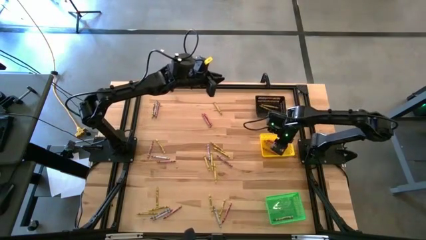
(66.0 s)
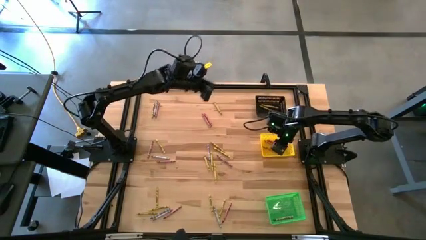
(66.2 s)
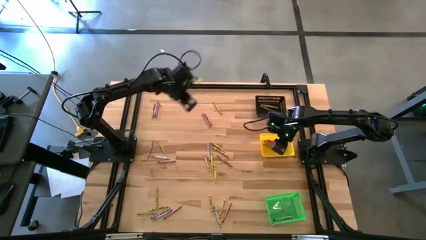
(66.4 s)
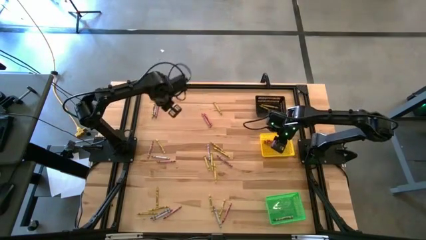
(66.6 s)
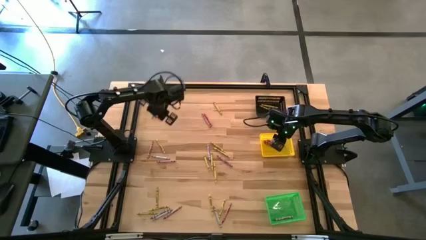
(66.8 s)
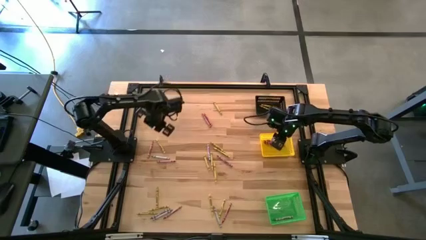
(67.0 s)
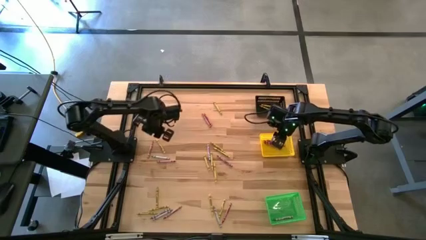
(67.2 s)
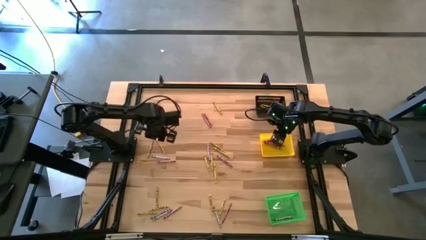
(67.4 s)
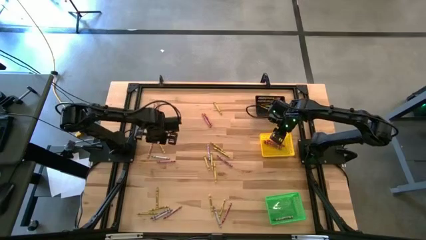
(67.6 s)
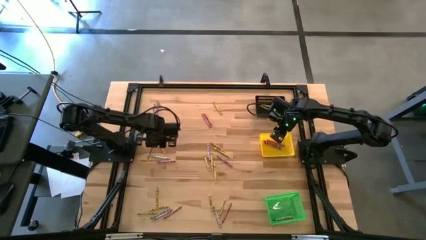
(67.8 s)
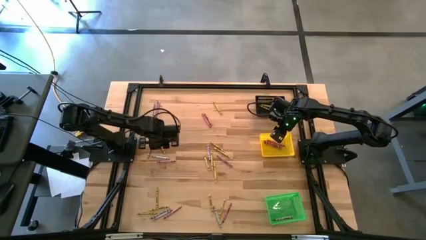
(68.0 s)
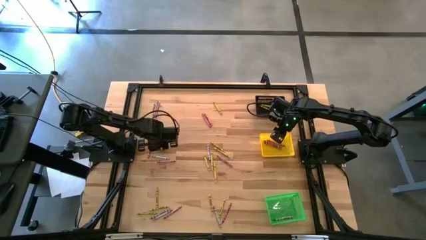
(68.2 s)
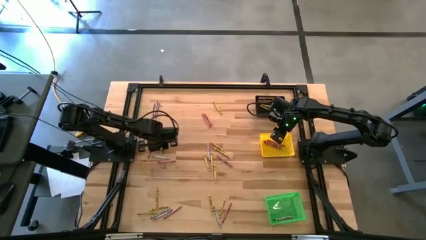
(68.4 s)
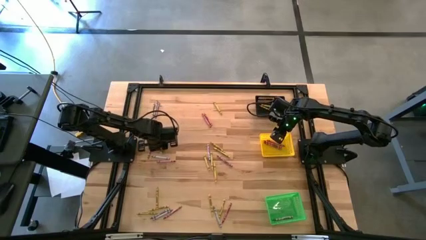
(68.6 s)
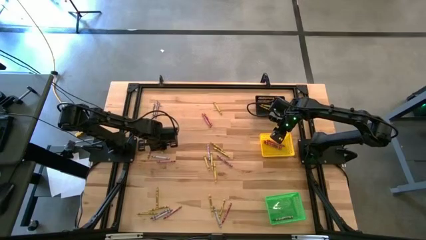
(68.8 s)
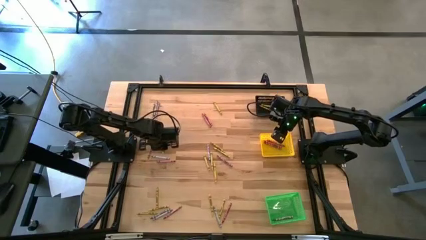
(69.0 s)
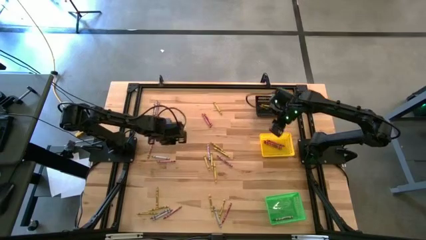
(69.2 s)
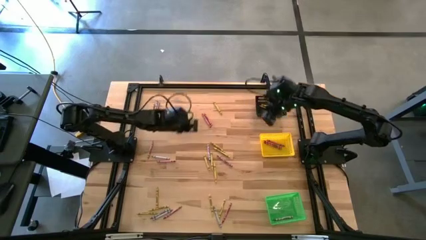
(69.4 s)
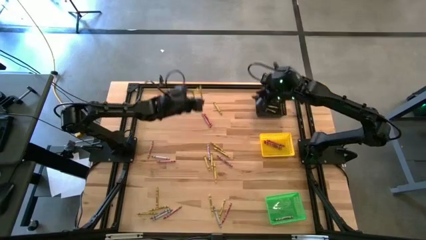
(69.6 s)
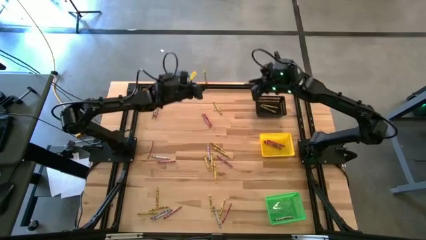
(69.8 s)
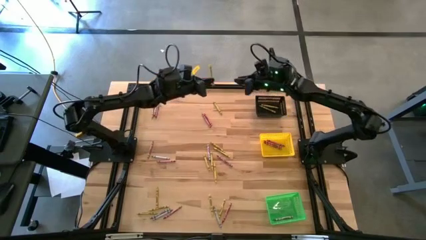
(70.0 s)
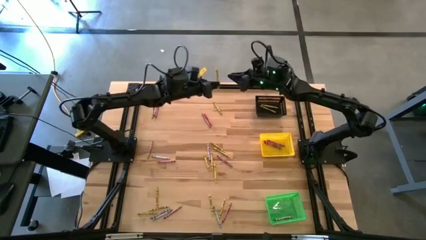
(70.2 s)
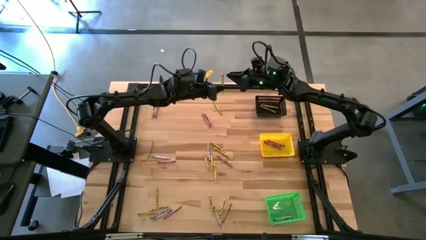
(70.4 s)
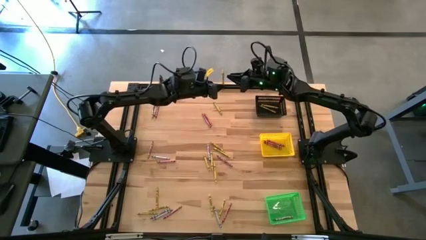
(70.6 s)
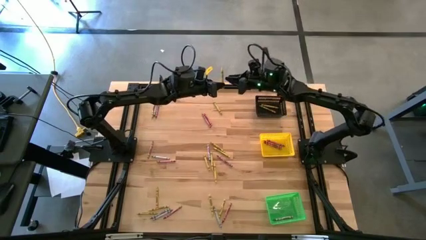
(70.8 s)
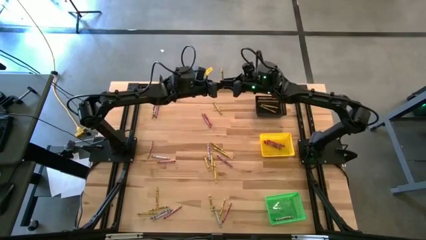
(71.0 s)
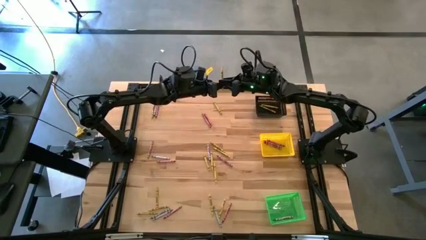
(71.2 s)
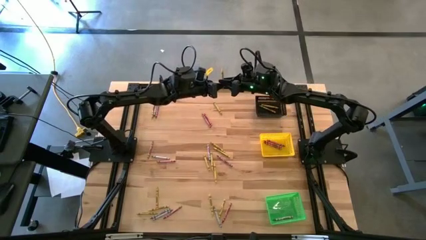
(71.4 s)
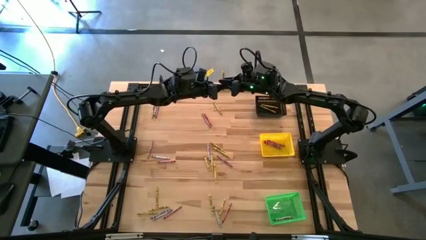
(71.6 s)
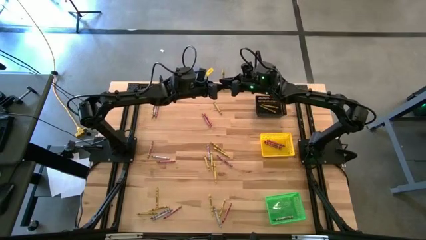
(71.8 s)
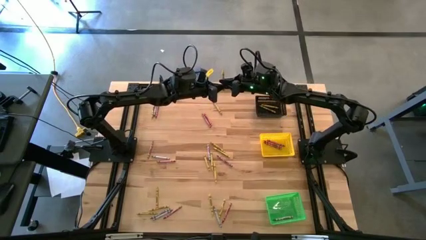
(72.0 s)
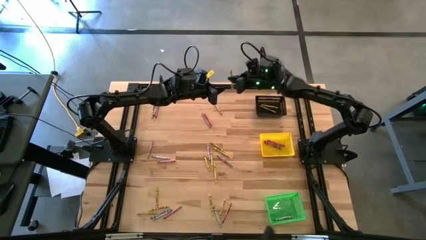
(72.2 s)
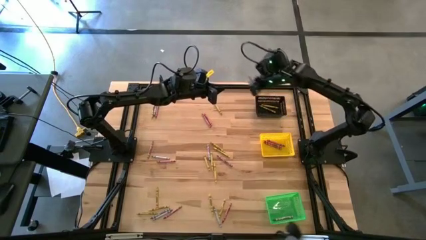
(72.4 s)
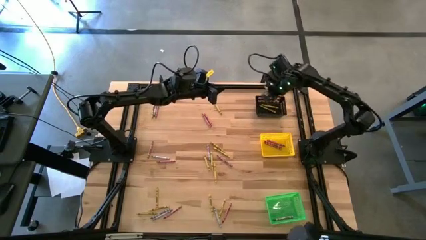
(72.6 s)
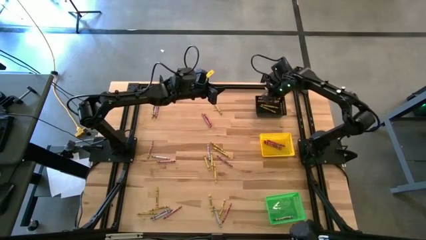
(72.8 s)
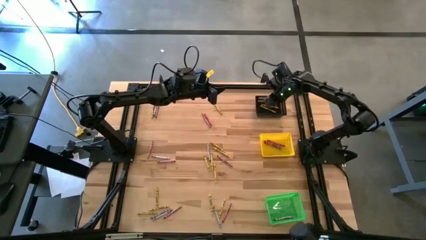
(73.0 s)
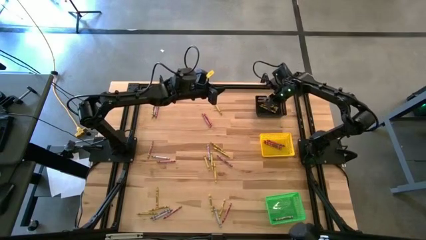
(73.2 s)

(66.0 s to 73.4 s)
Task: Sort crayons
Put the yellow crayon into the black bin

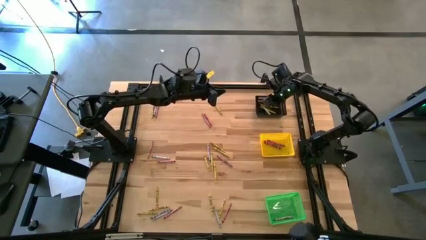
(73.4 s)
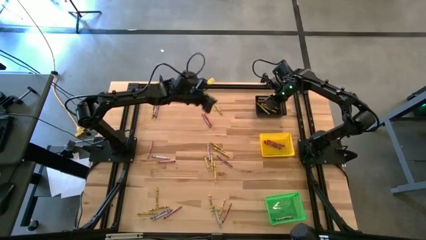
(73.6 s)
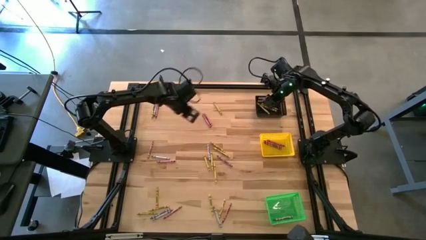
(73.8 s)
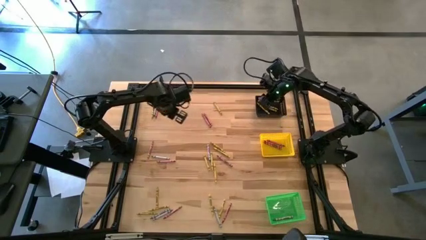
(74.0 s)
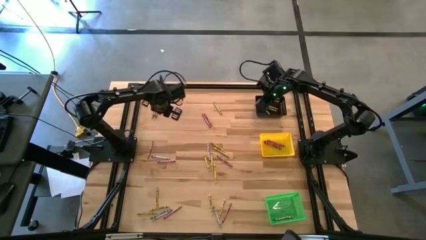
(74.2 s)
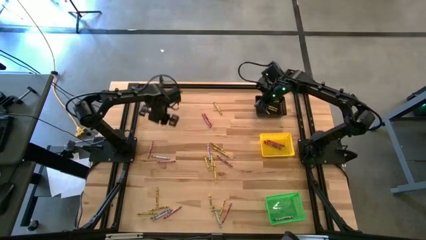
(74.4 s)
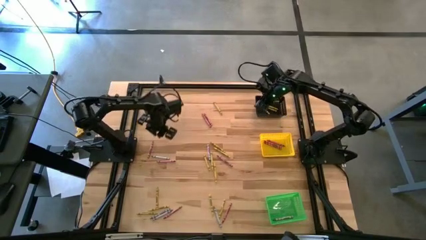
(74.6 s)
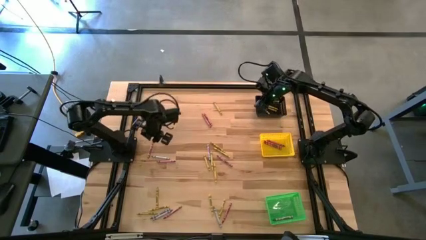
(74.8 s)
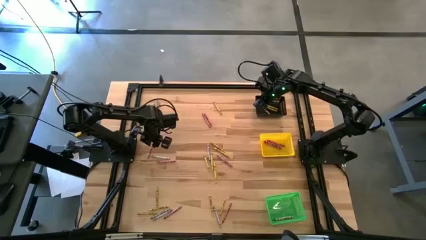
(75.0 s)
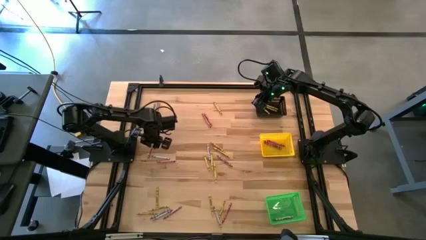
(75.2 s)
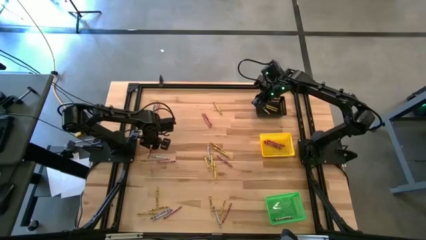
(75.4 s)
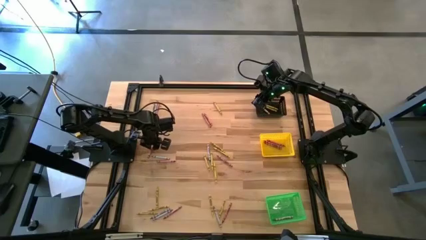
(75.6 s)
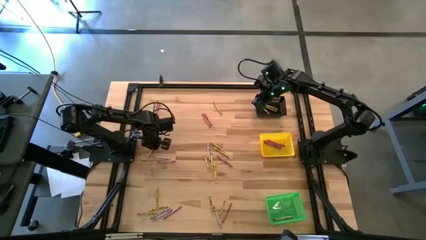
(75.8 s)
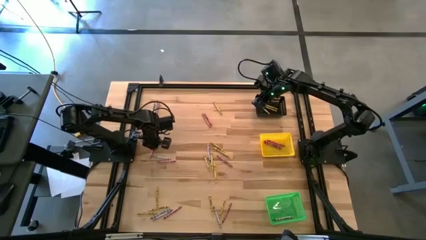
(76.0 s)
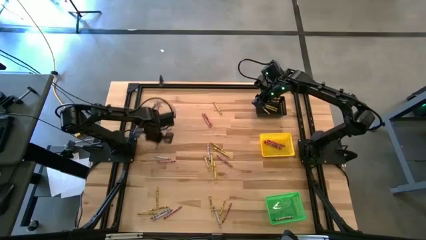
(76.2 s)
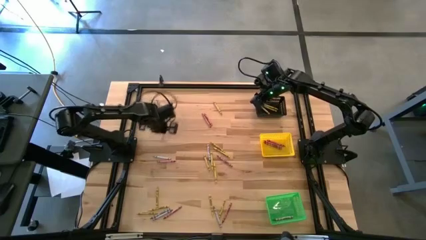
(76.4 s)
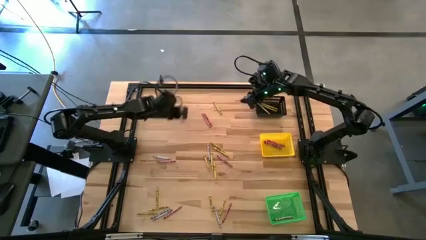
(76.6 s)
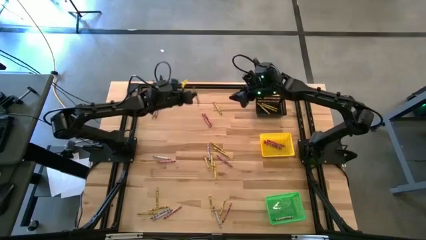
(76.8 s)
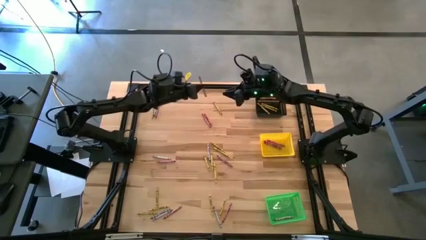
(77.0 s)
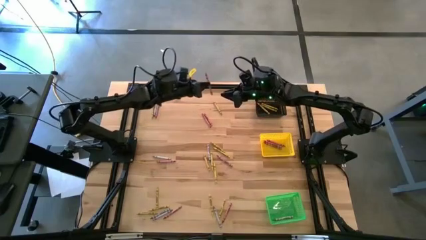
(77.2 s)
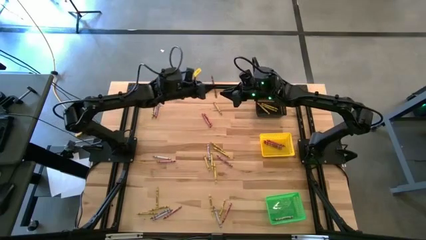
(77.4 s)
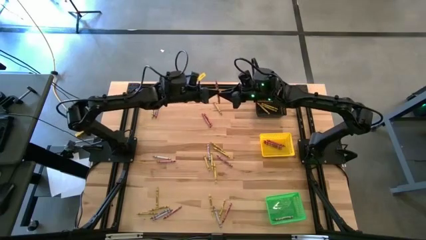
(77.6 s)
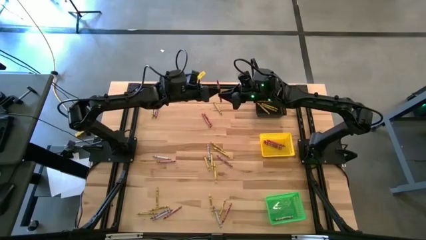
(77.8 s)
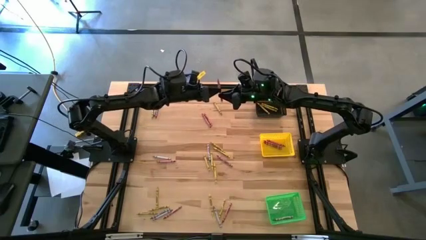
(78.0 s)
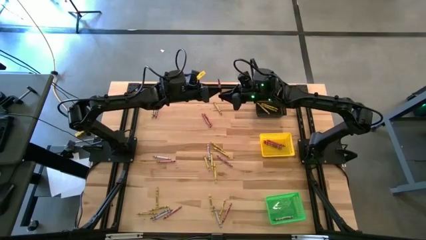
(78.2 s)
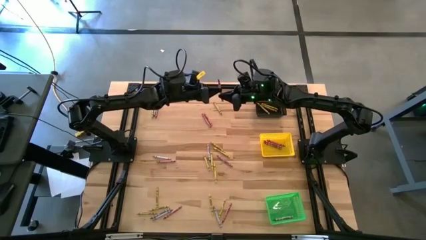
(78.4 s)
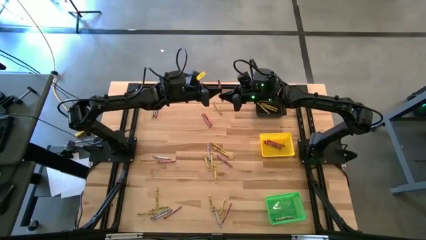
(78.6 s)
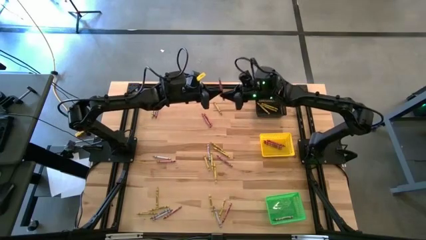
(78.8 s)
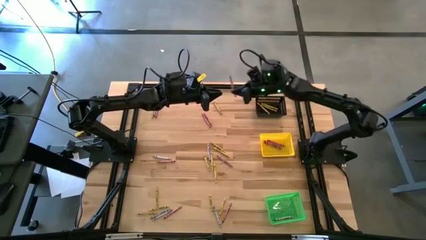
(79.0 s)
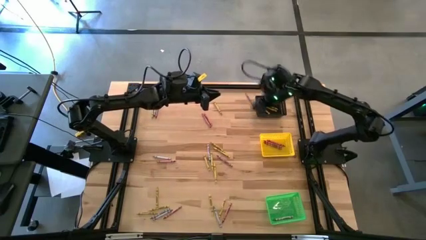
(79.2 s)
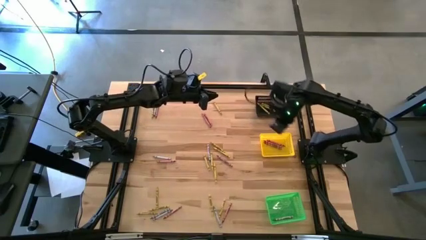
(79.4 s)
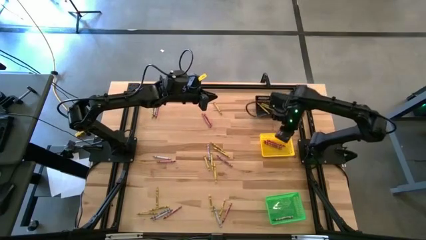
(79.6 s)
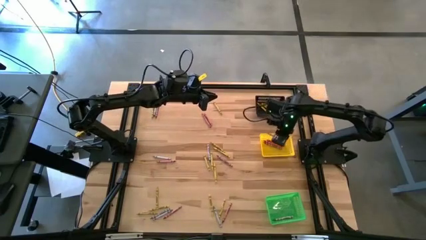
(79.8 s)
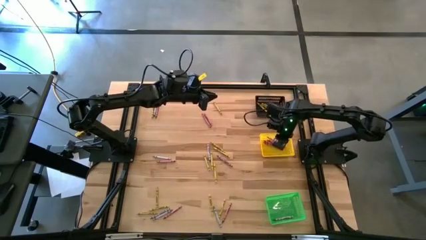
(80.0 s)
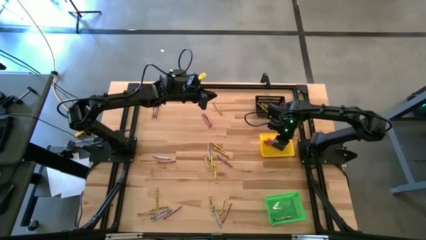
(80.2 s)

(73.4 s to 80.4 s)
Put the red crayon into the yellow bin

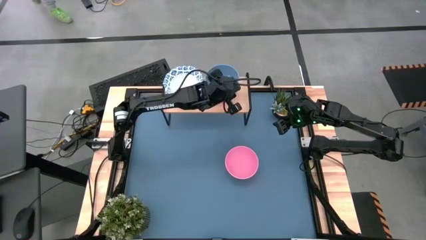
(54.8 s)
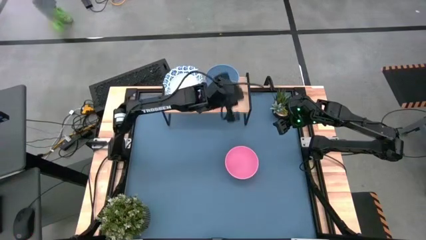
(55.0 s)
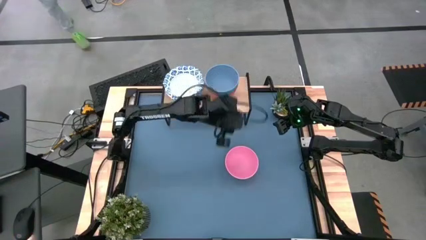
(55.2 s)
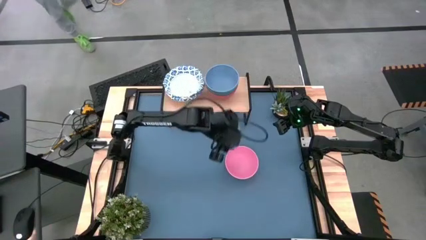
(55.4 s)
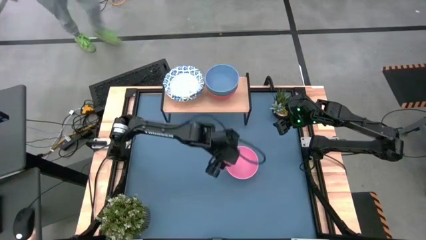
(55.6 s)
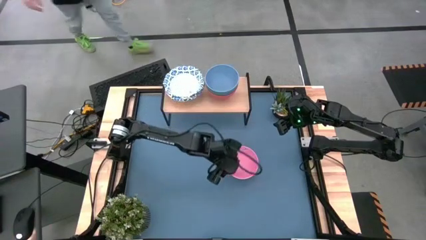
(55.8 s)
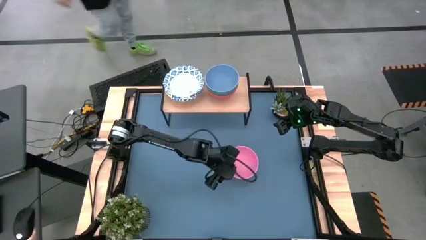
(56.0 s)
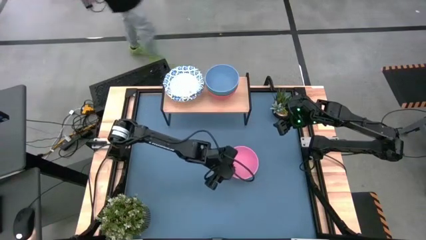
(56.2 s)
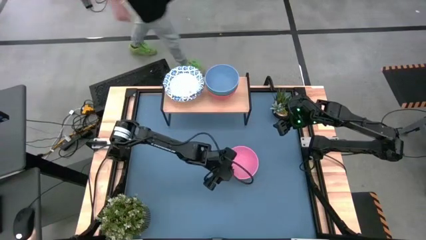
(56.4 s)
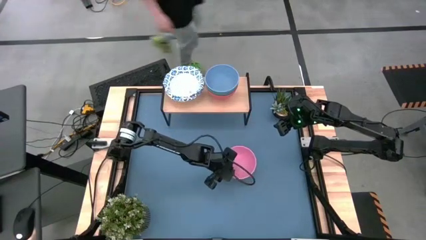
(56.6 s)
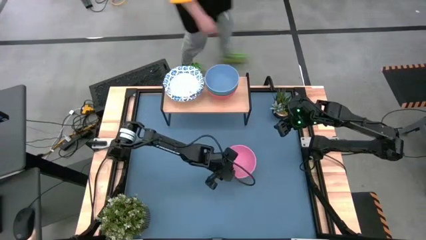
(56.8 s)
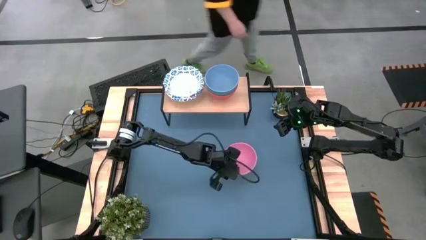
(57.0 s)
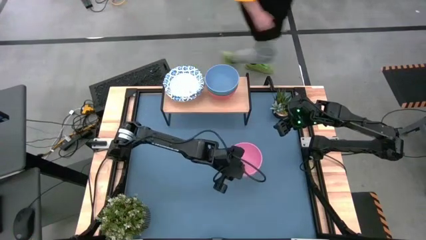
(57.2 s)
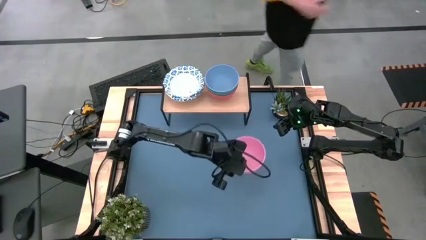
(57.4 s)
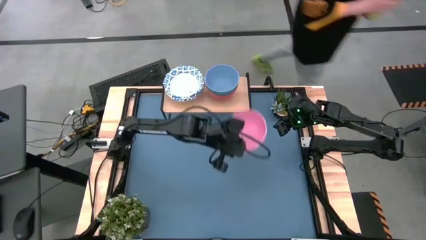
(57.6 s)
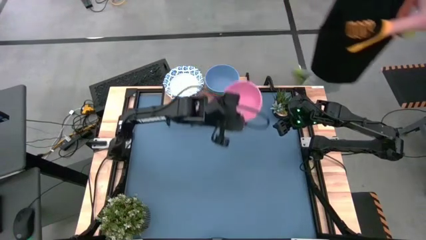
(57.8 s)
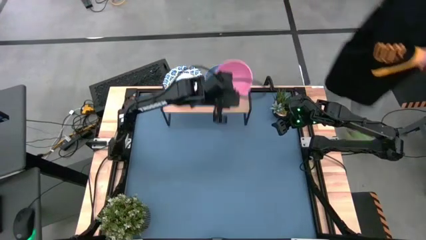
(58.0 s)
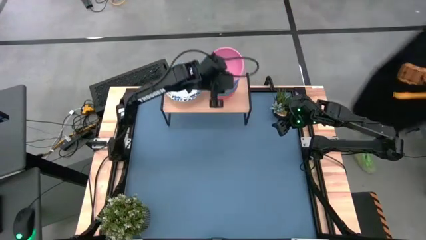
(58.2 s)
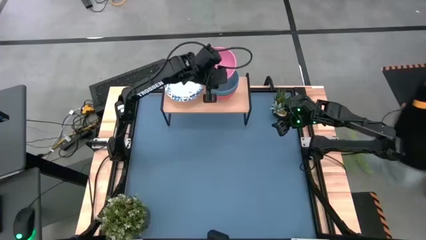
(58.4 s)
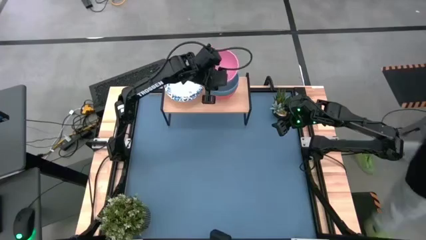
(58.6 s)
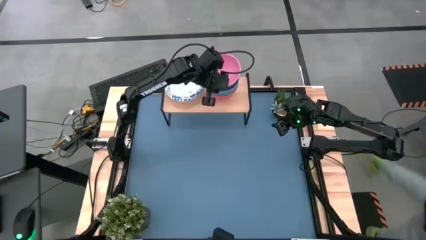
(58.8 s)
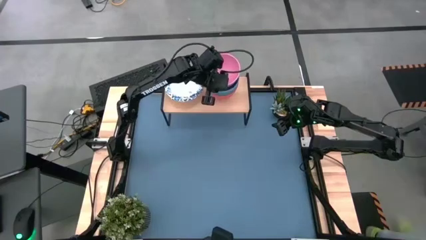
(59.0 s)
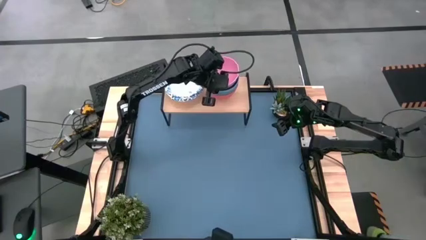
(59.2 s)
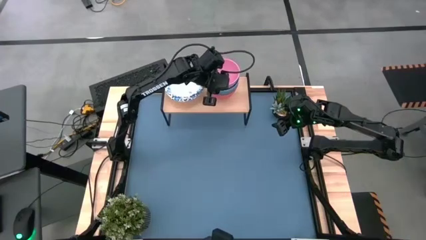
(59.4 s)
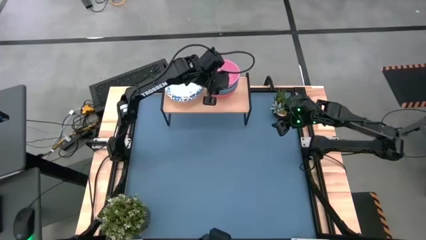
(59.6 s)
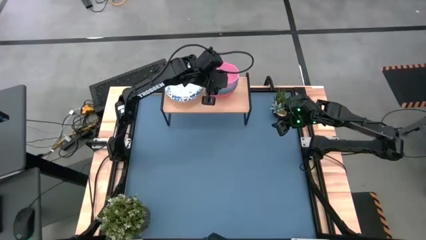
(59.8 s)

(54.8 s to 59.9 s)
Task: Place and stack bowls onto a shelf
Stack the pink bowl on the blue bowl on the shelf
